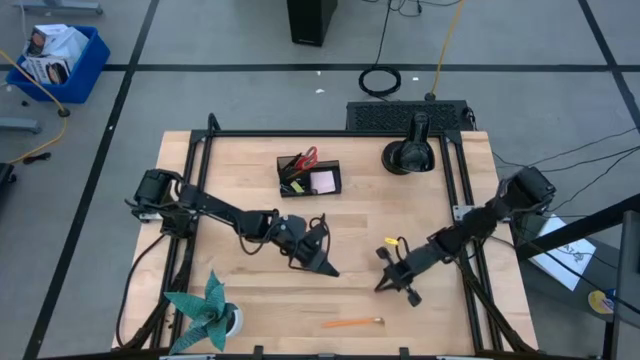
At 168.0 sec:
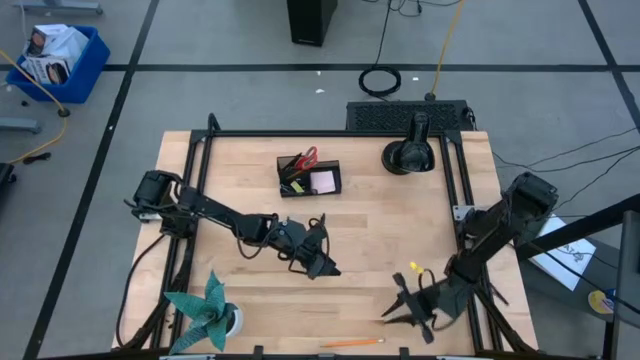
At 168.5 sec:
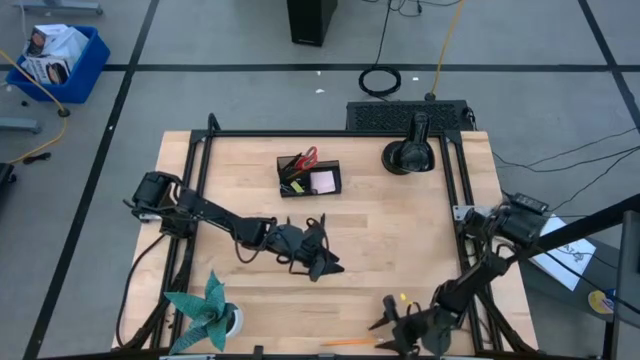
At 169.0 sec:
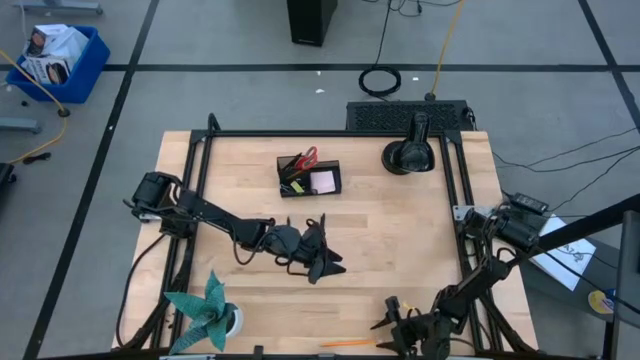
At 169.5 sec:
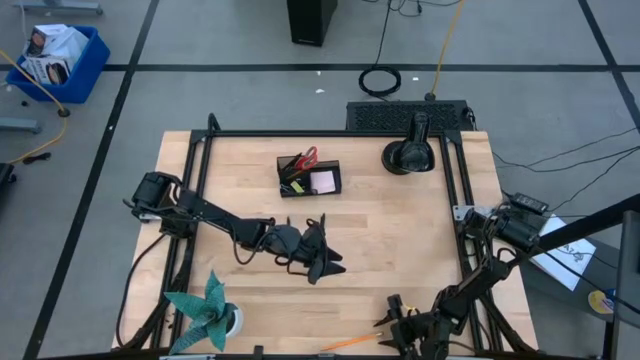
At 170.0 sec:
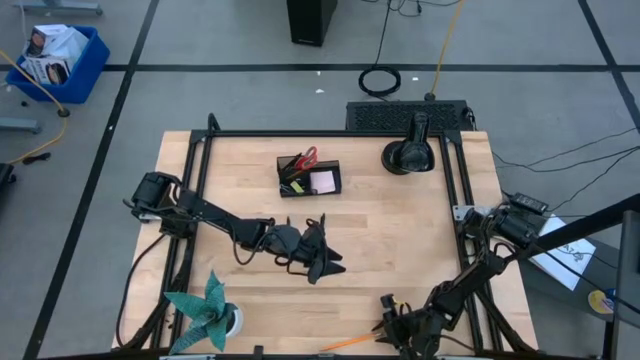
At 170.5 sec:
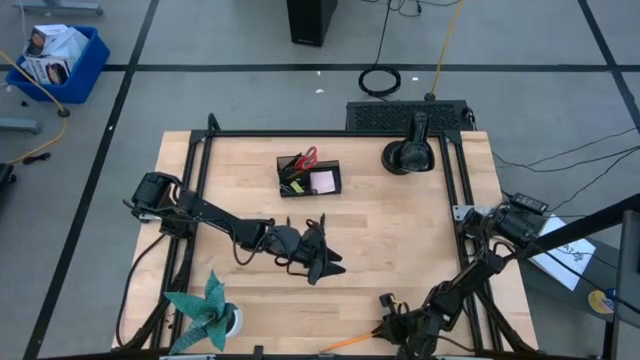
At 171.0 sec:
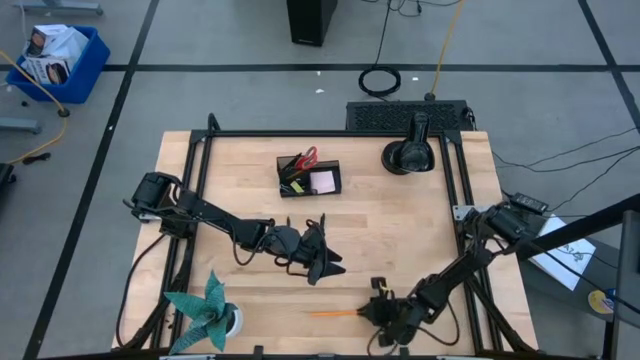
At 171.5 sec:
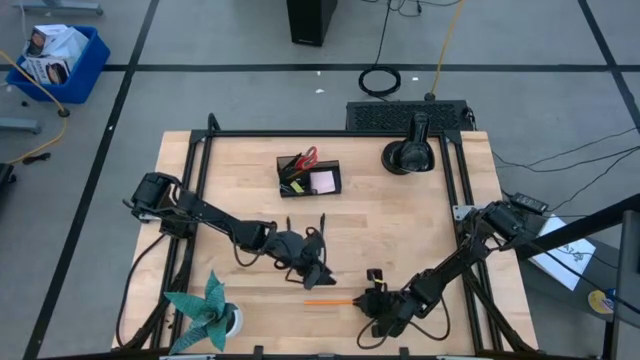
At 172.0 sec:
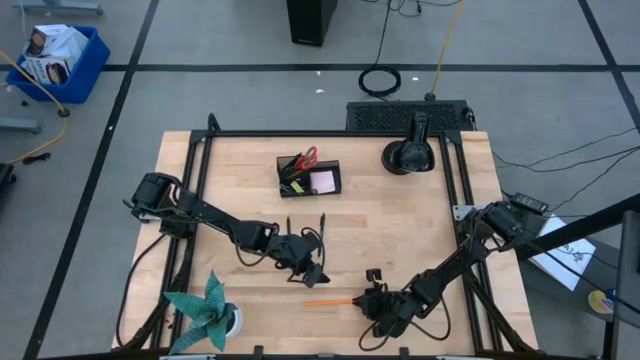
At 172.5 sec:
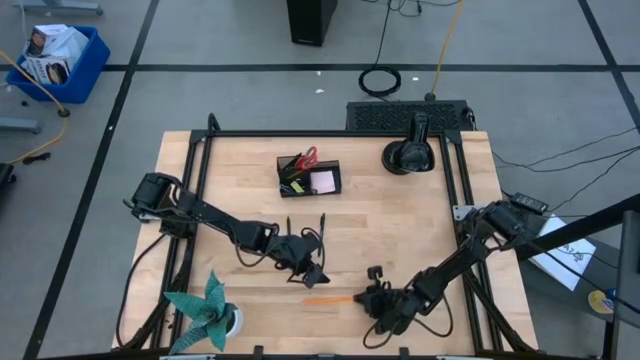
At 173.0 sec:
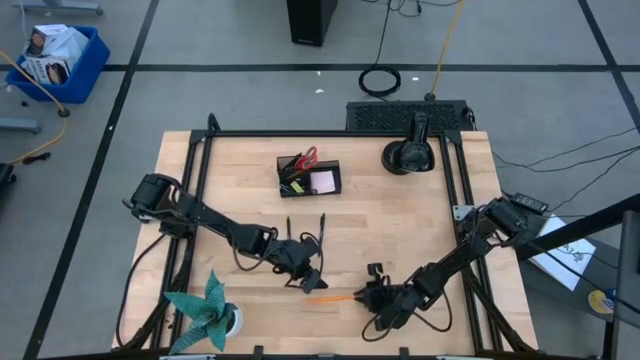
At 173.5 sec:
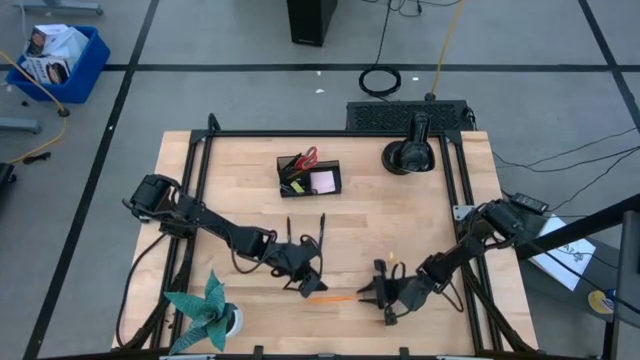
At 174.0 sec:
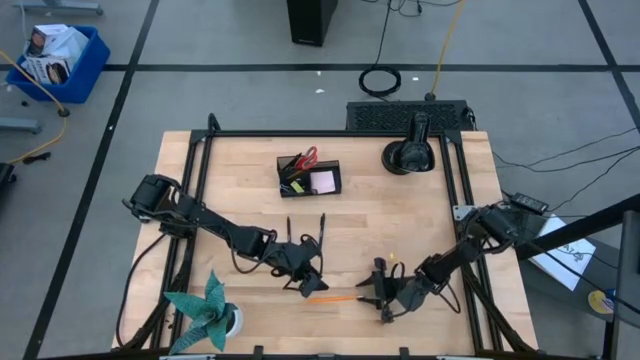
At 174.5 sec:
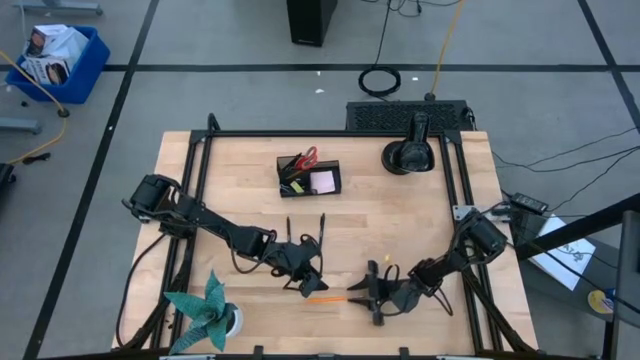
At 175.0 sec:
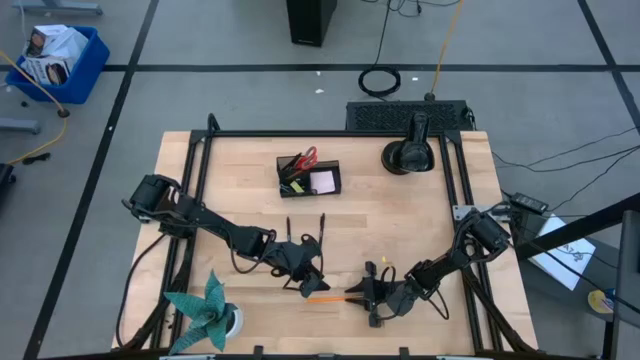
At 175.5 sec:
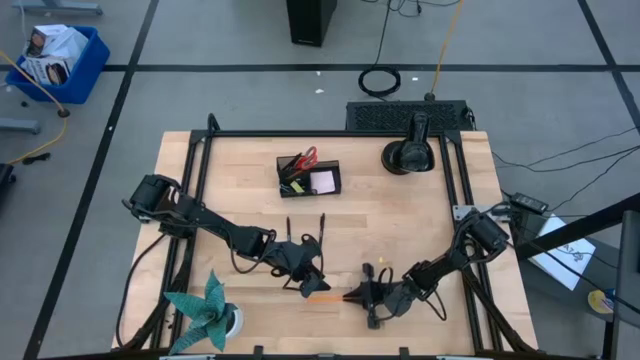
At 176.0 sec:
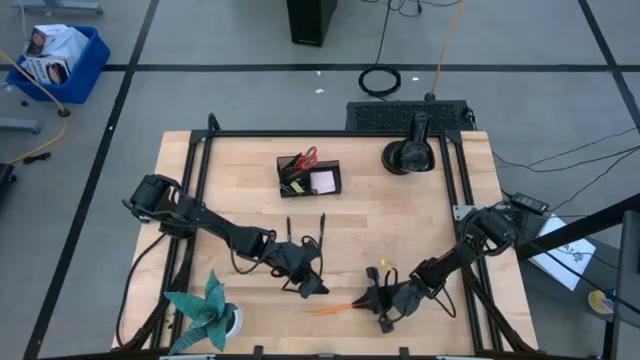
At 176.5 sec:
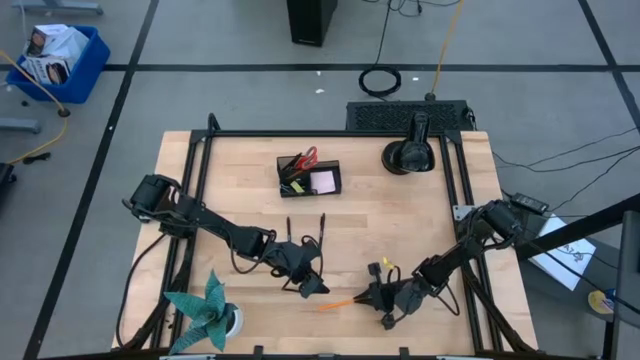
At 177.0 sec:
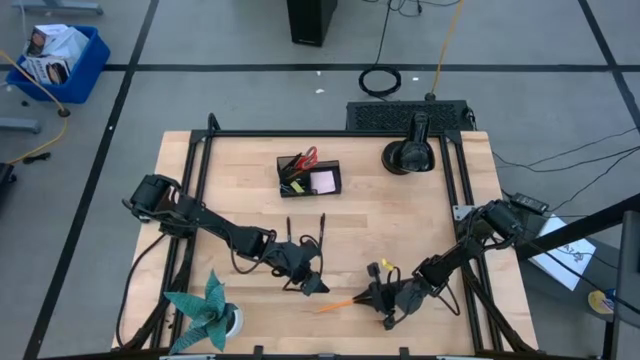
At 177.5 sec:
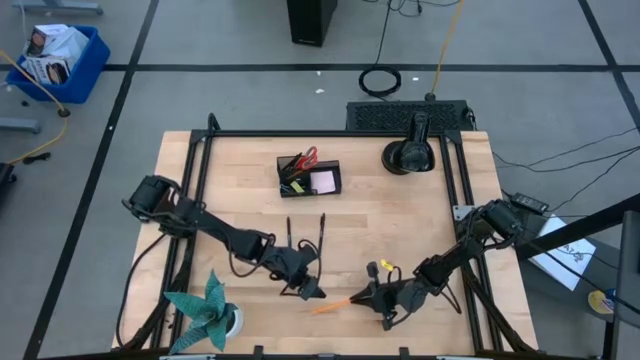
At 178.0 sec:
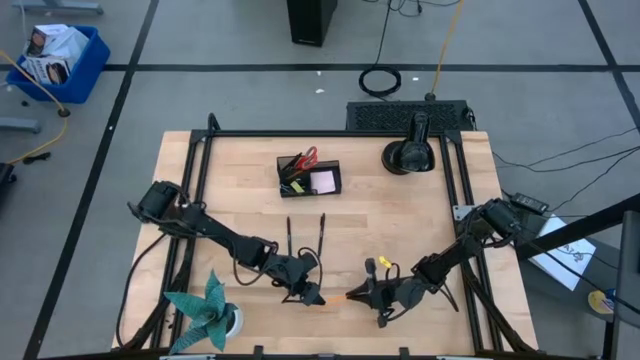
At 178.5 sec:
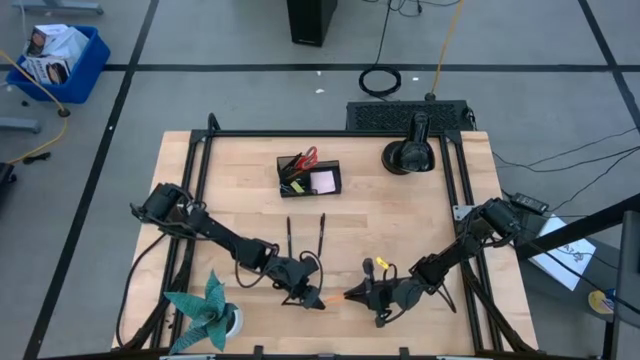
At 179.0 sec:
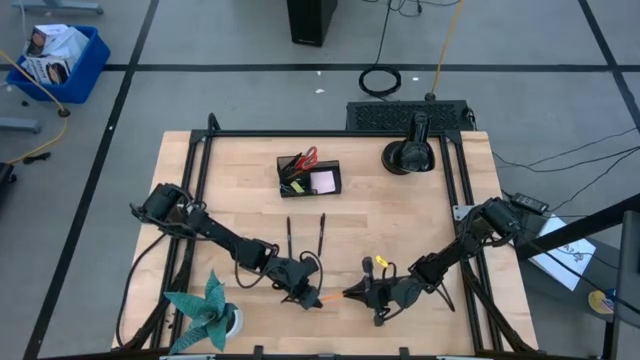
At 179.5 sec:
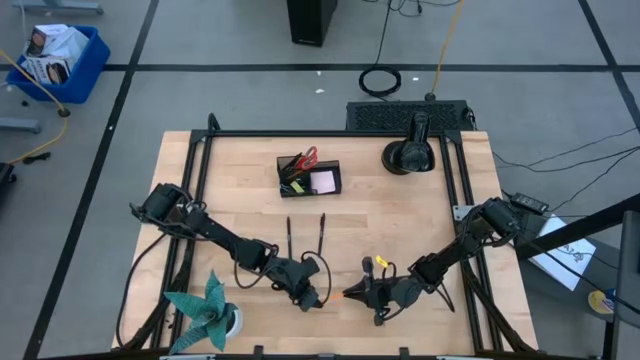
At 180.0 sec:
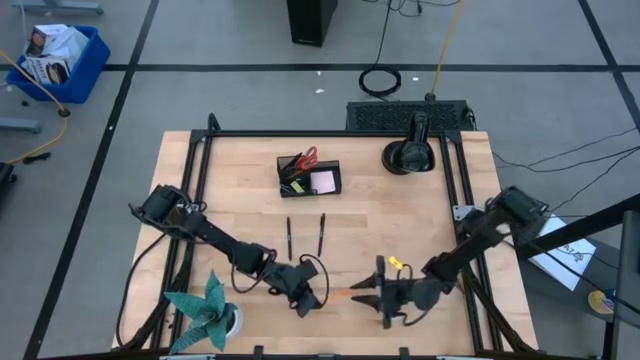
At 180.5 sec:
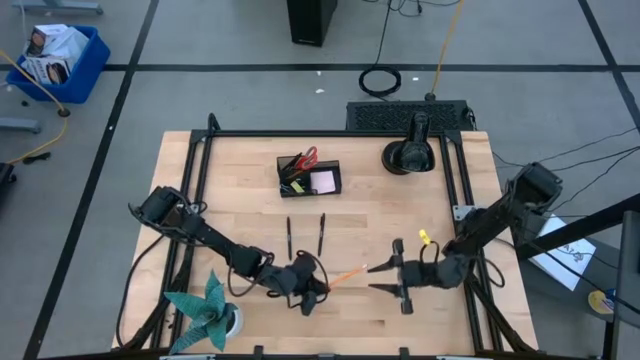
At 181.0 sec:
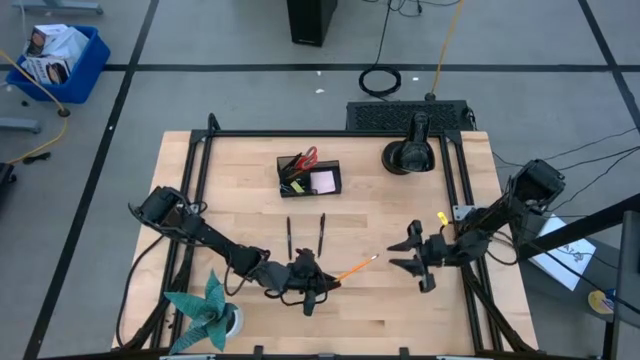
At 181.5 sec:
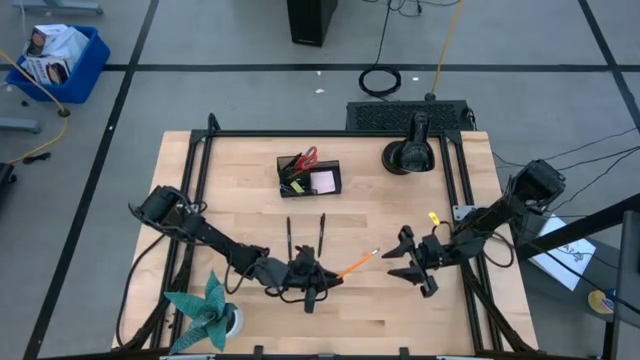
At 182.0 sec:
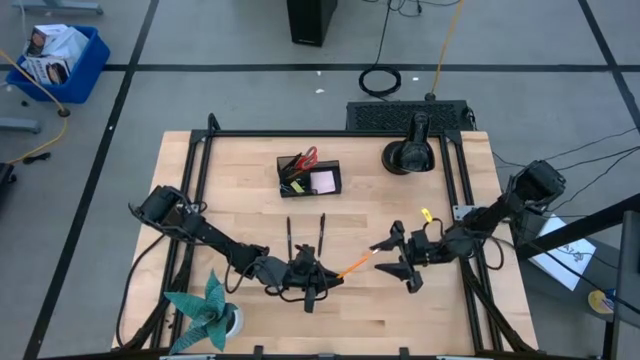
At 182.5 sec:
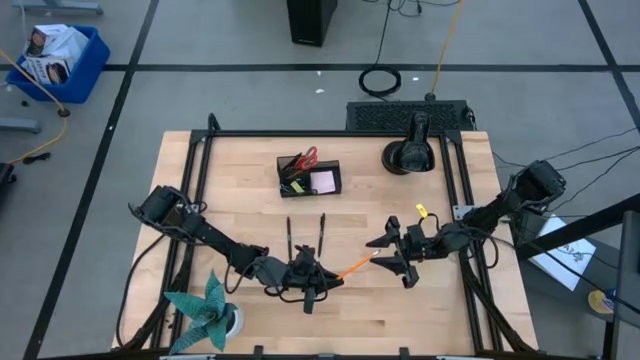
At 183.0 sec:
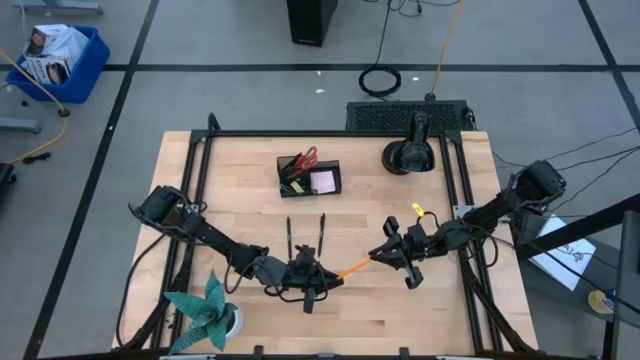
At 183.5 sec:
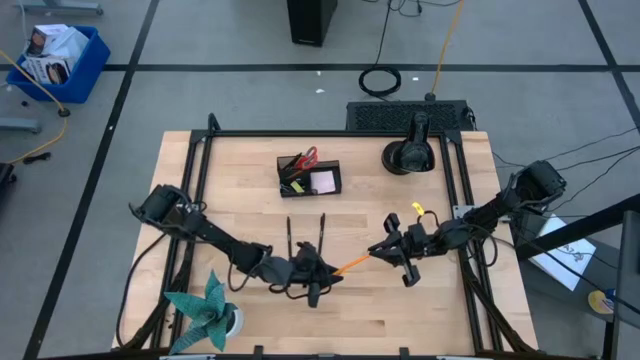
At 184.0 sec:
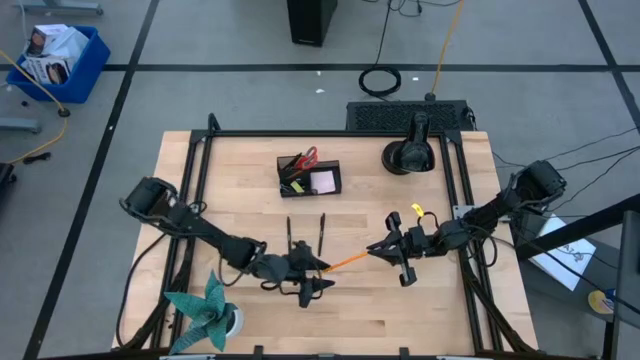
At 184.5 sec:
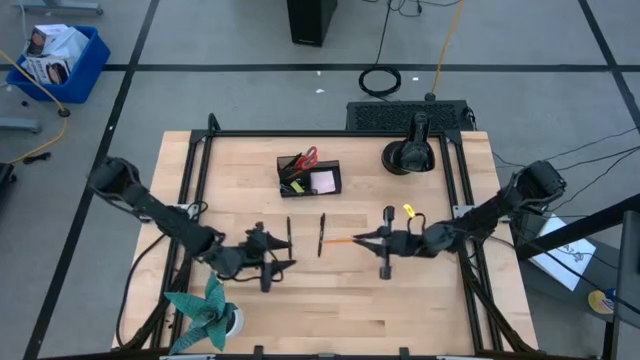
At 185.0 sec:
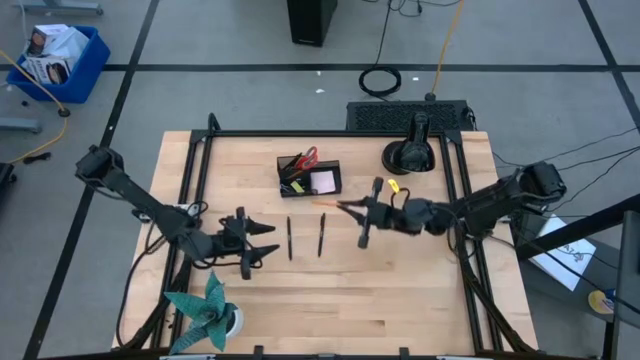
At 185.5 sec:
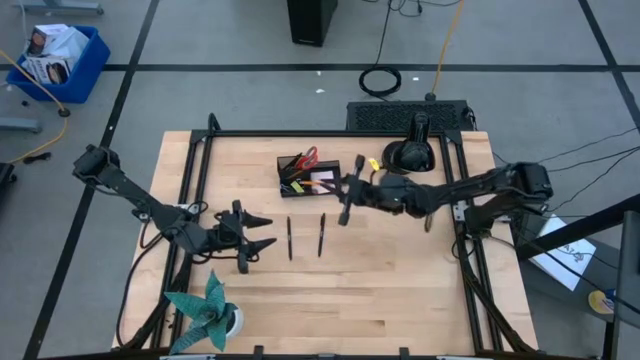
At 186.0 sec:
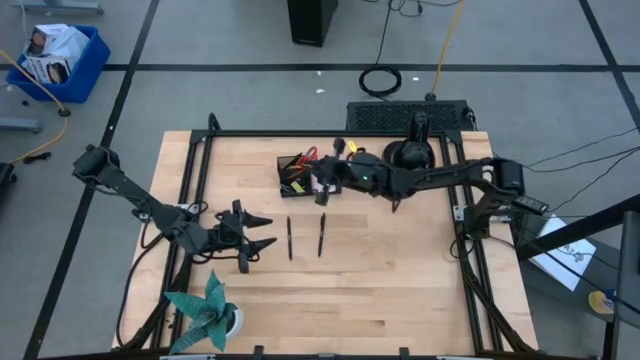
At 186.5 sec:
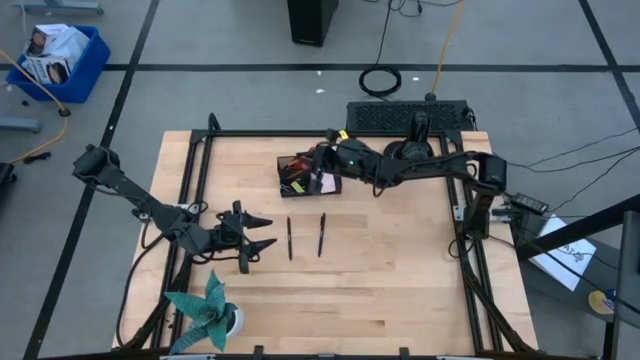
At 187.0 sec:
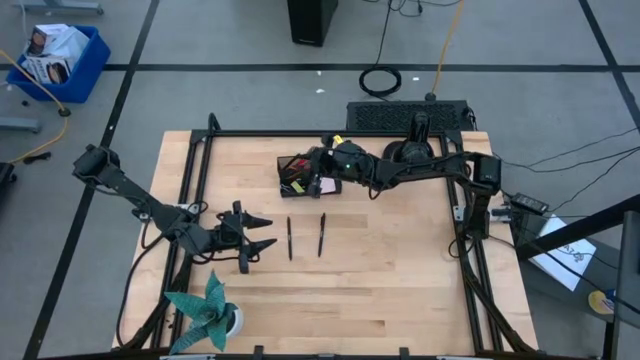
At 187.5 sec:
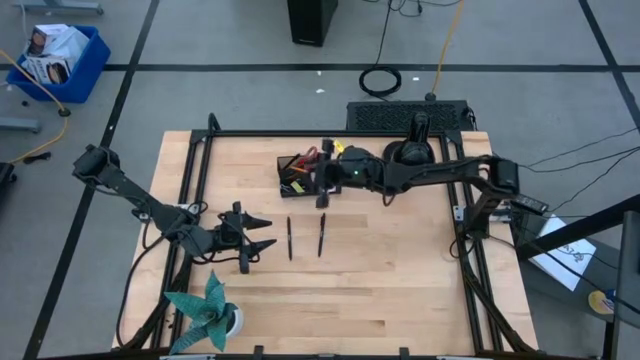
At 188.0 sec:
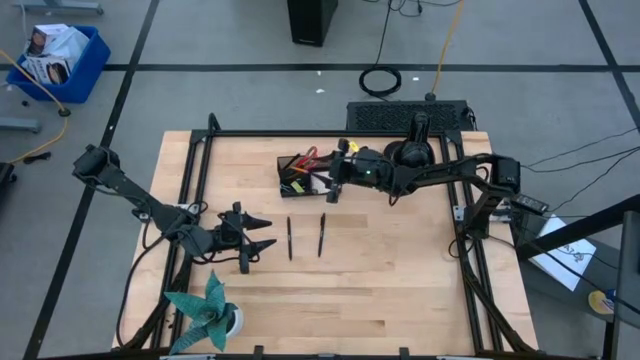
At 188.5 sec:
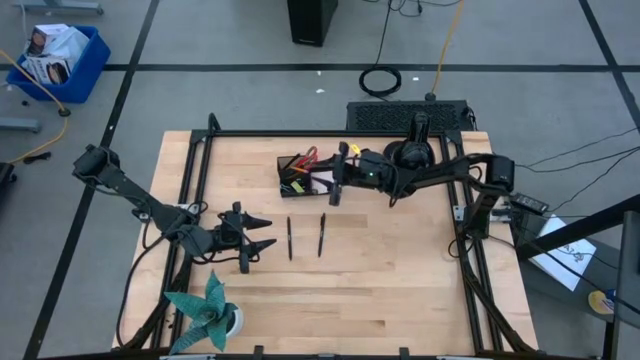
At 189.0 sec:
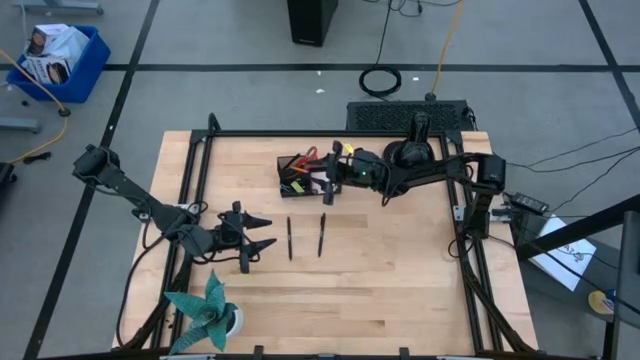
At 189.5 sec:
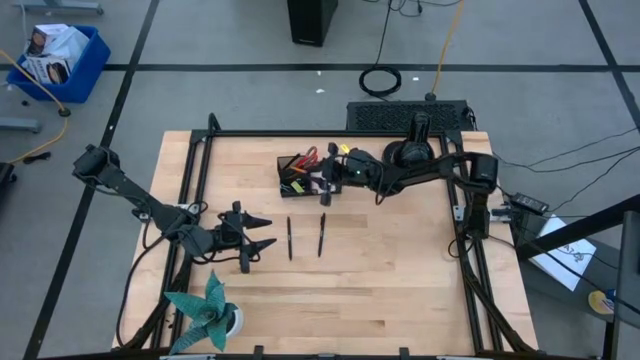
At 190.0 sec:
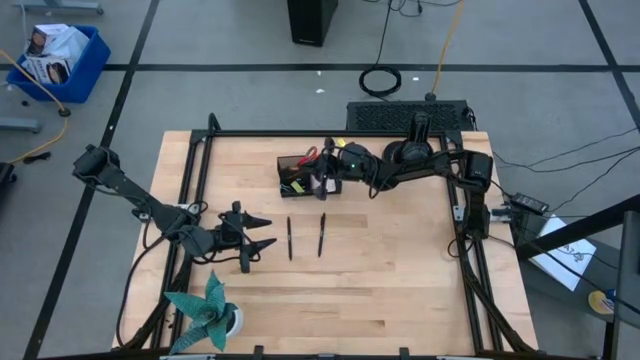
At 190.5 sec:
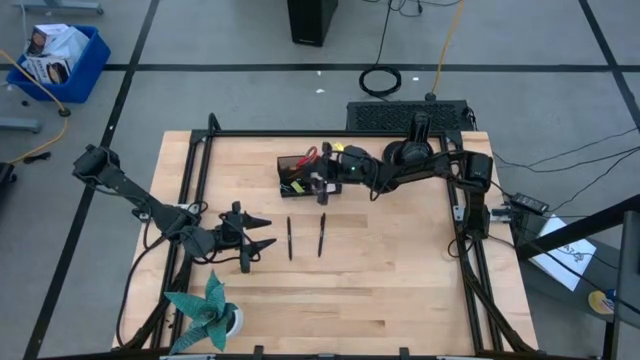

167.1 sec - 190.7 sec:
Task: Pick and place office supplies into organizer
Put the orange pencil into the black desk organizer
